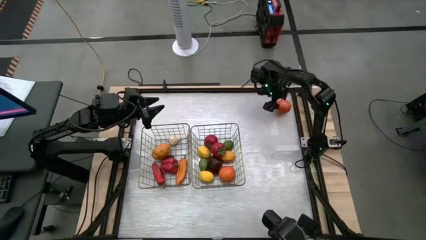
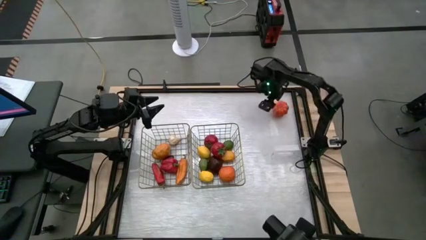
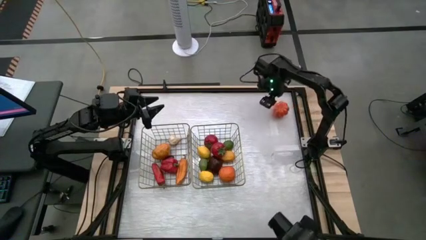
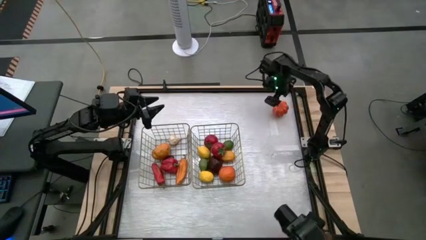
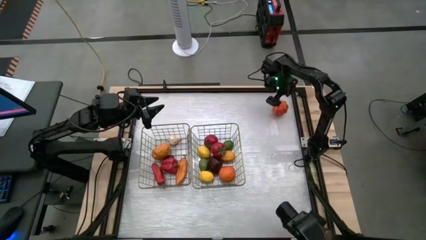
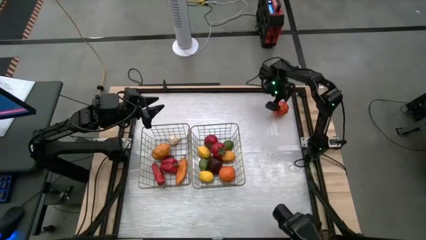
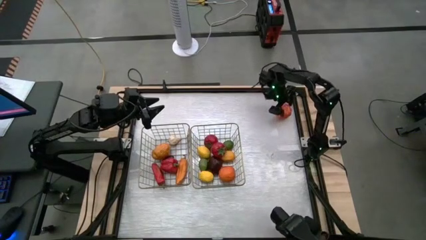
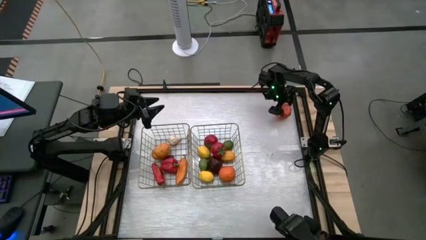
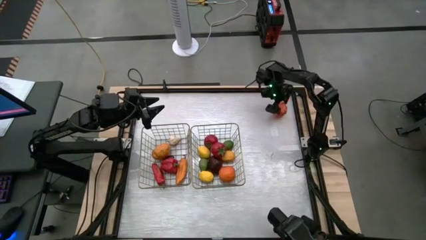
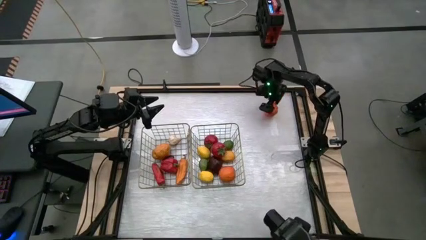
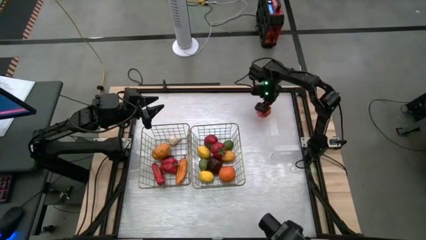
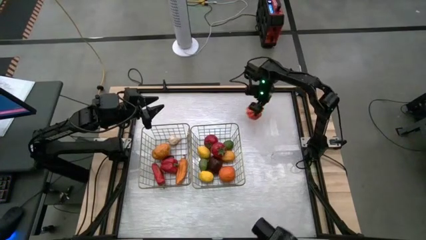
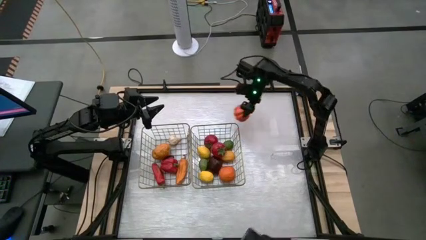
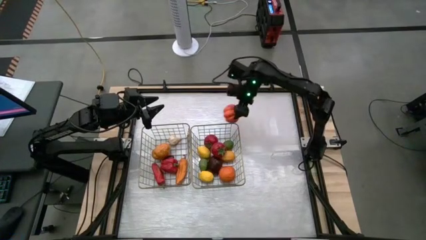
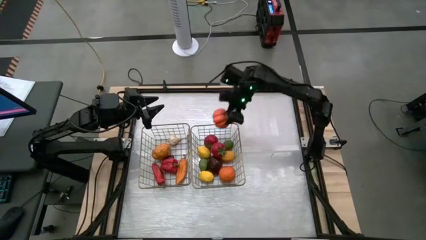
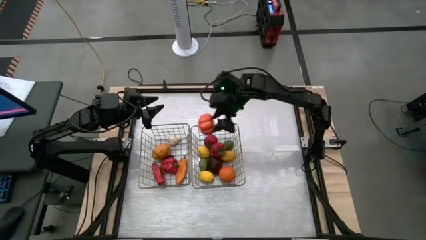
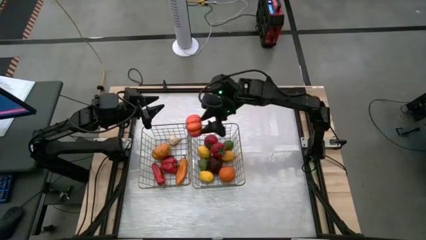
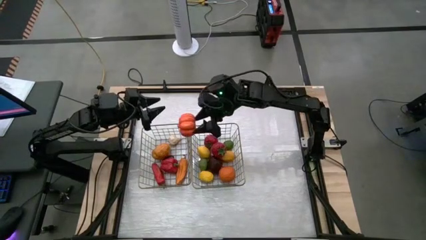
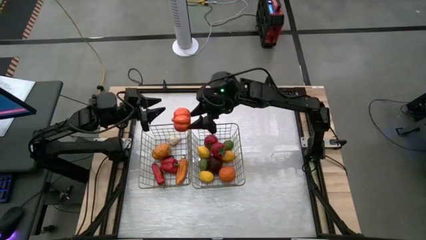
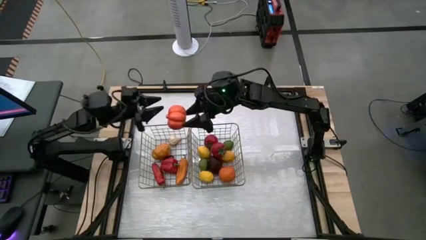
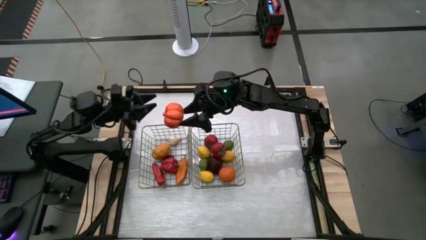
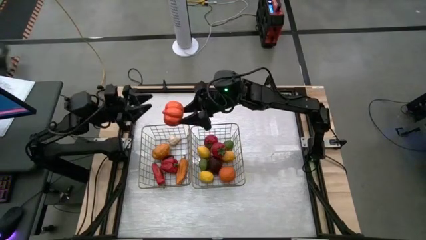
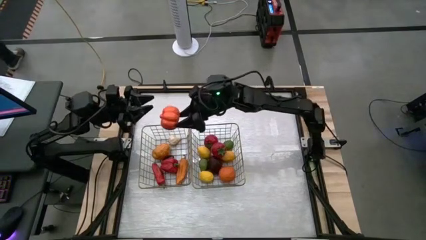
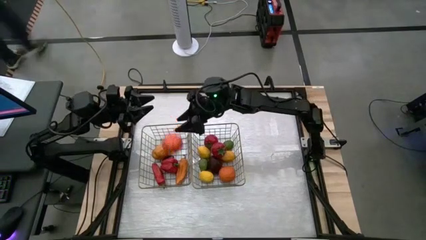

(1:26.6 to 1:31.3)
Task: Sort produce into baskets
Put the orange pumpkin into the left basket

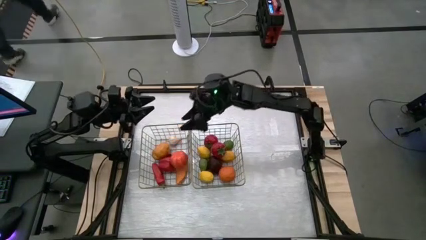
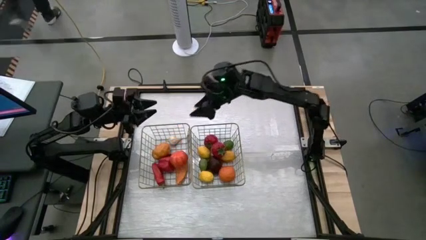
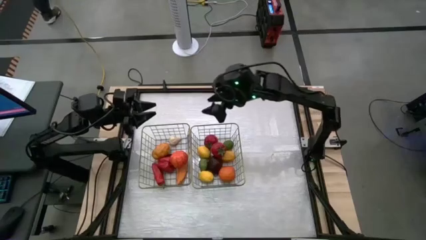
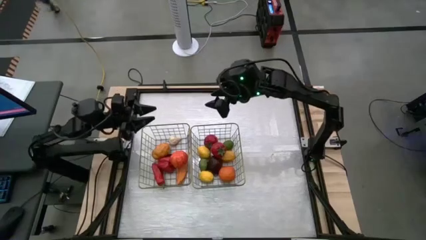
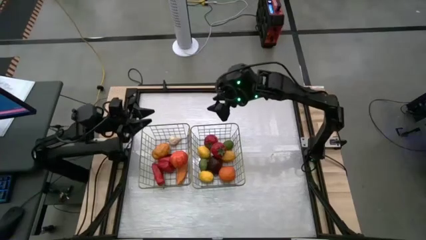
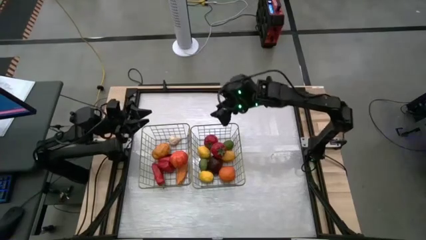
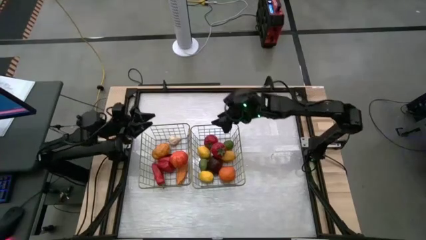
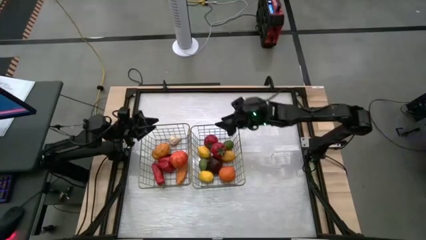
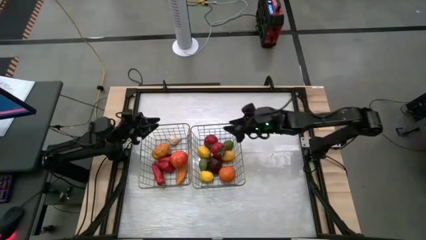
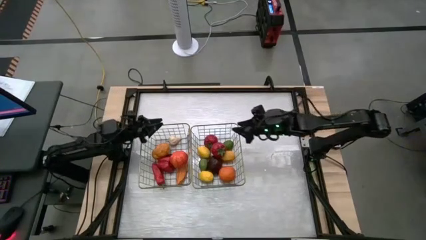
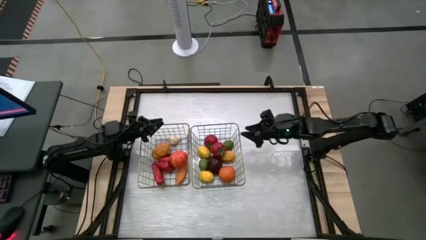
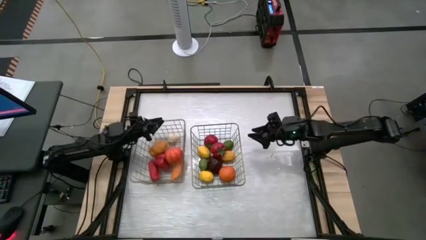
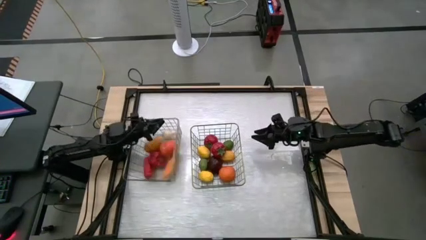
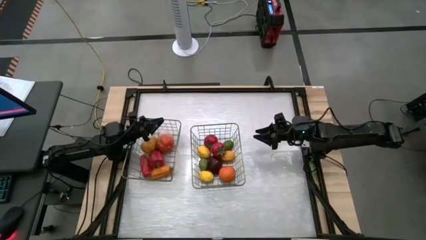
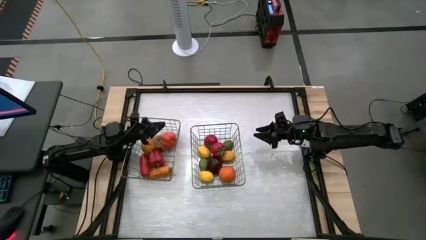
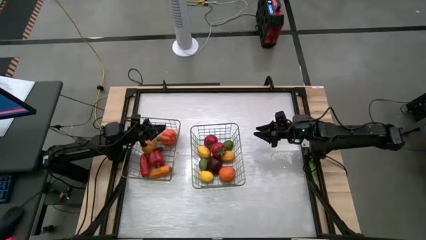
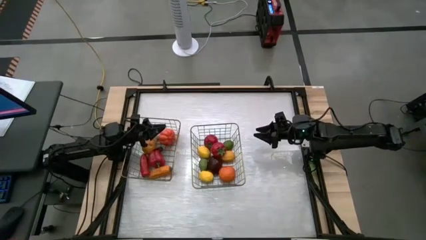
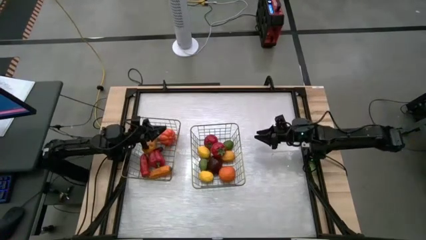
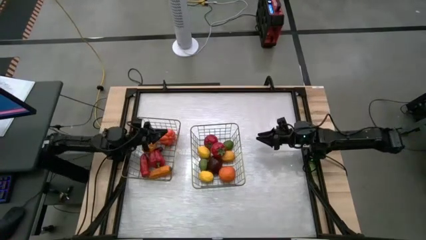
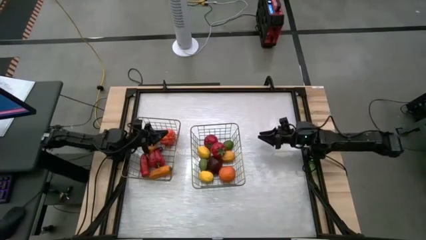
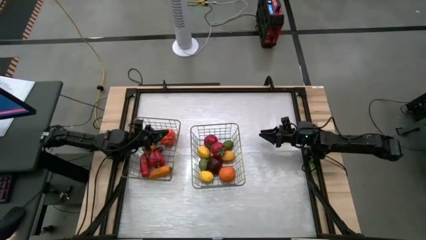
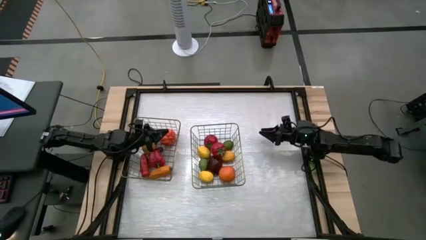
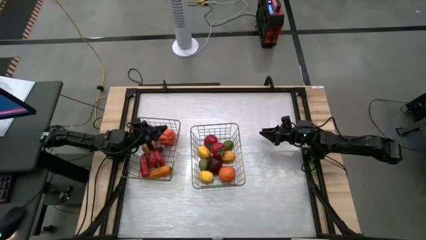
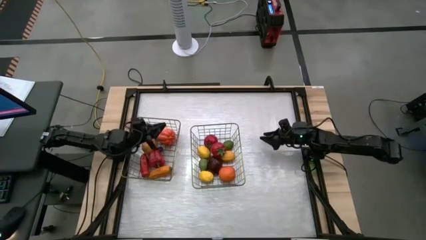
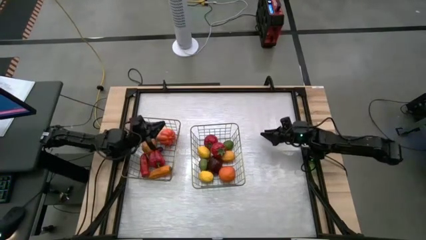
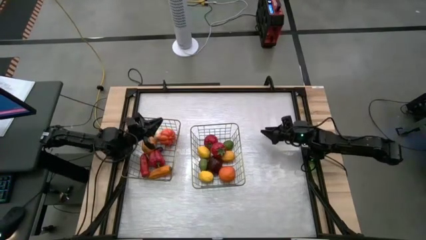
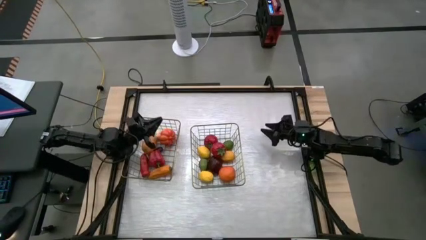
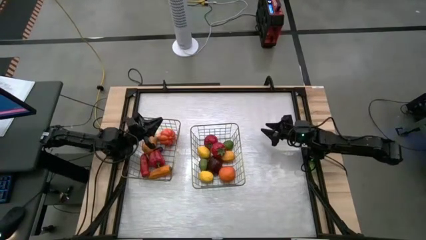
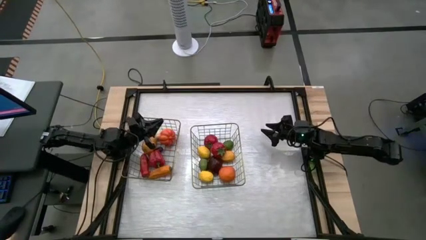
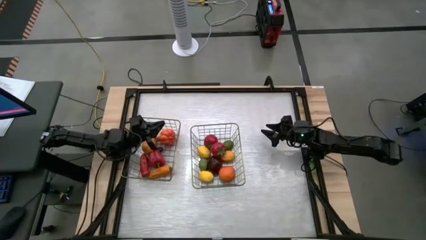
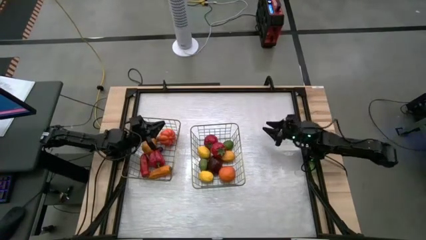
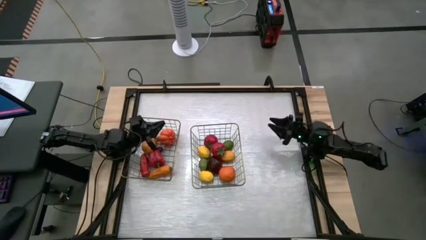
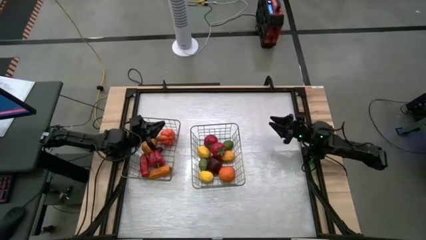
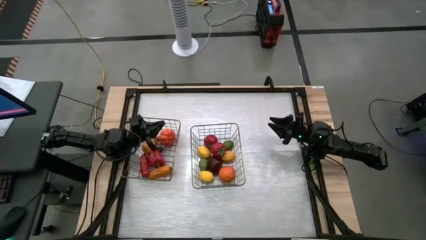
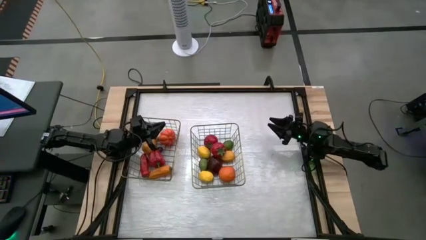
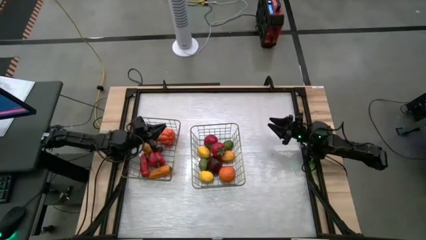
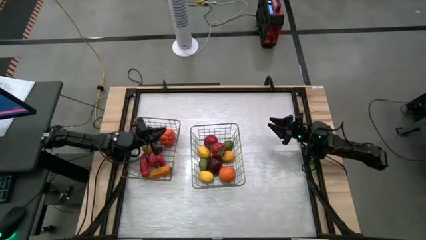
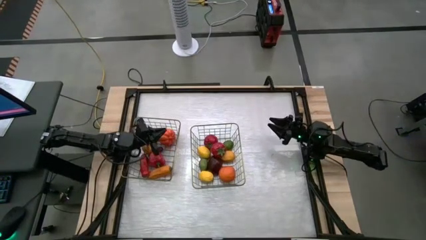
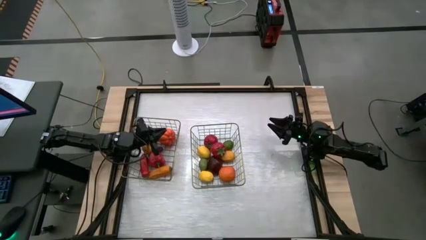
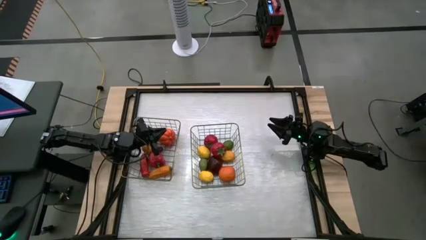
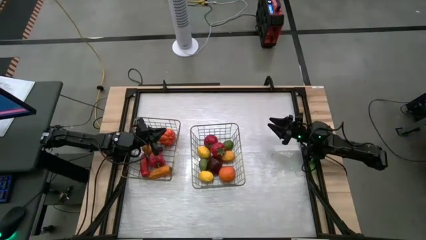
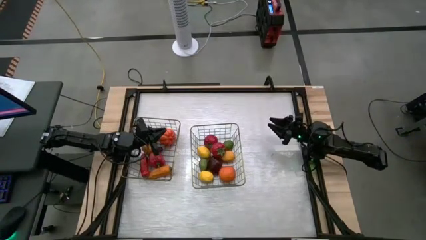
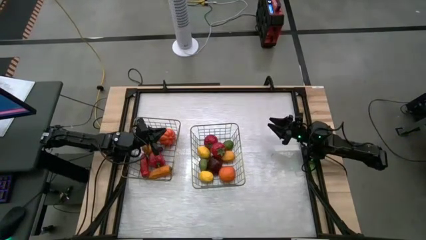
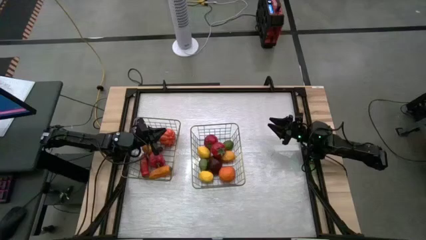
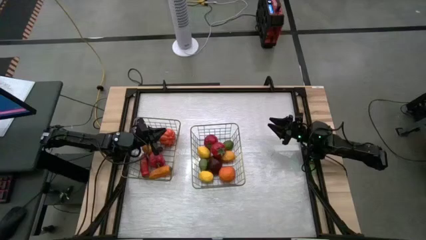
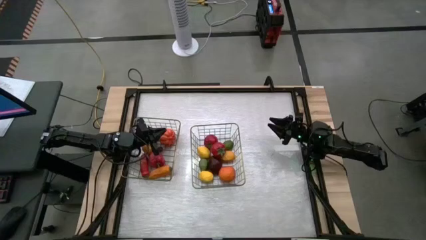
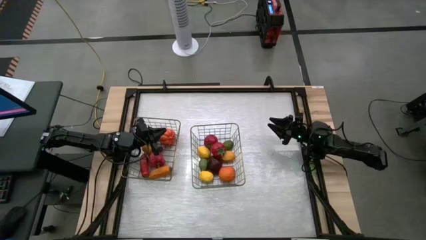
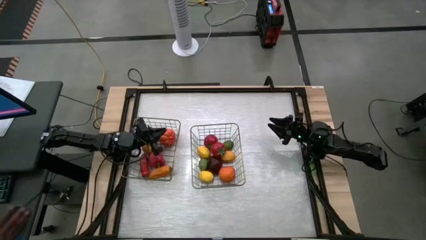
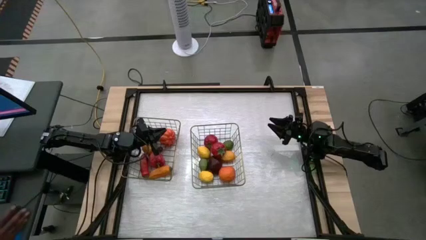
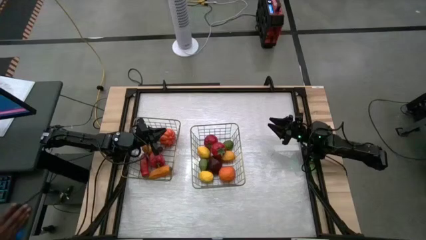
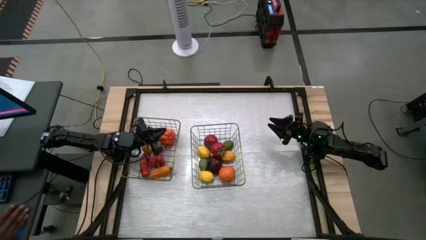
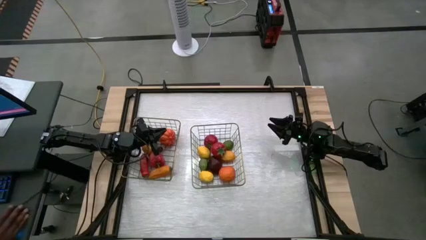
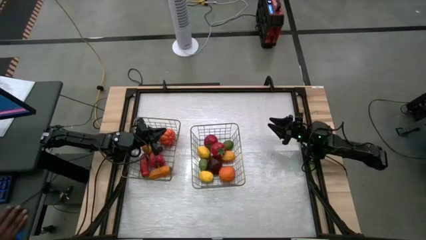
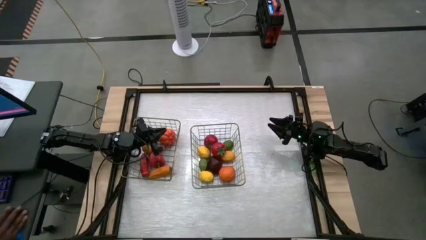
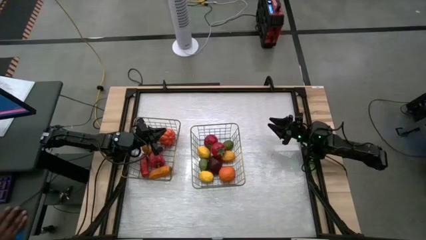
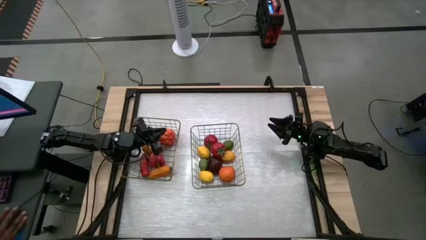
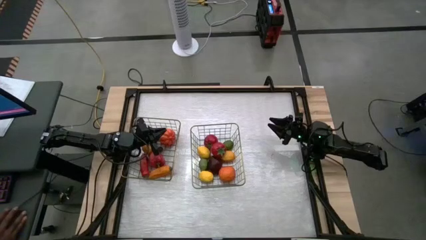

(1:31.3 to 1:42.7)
Return to Home Position
